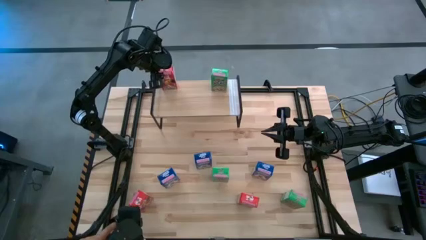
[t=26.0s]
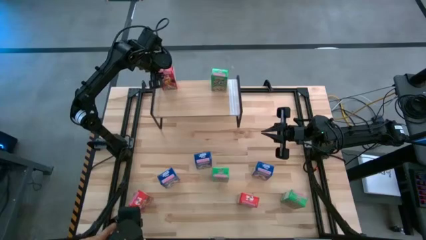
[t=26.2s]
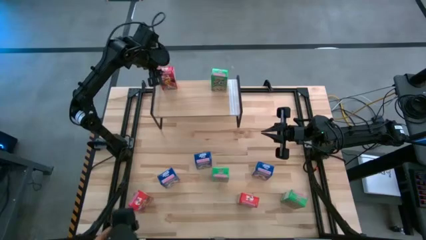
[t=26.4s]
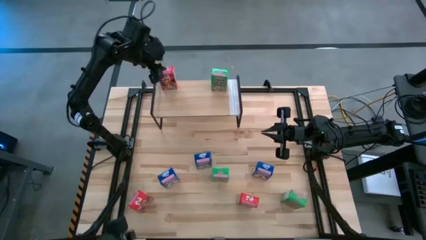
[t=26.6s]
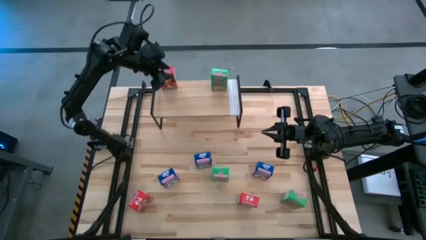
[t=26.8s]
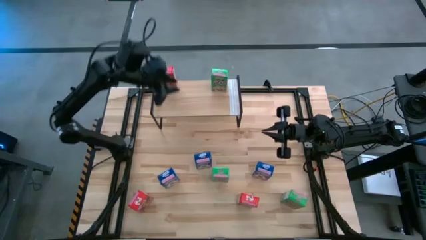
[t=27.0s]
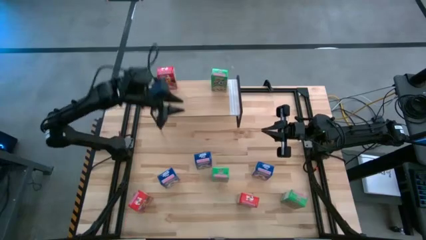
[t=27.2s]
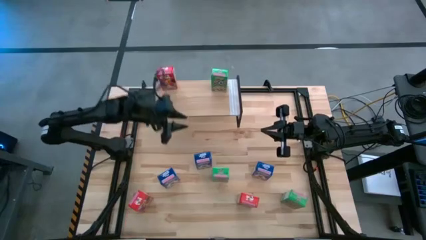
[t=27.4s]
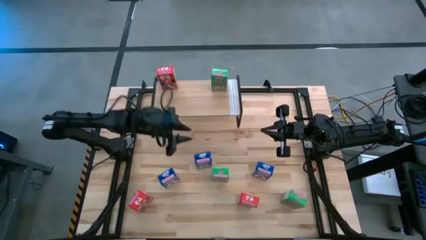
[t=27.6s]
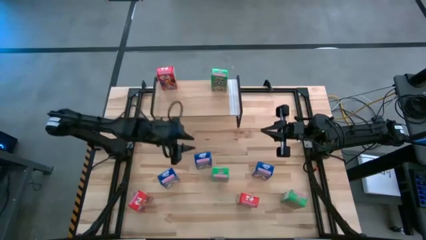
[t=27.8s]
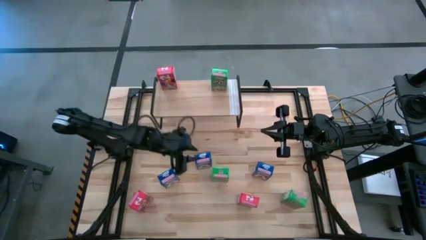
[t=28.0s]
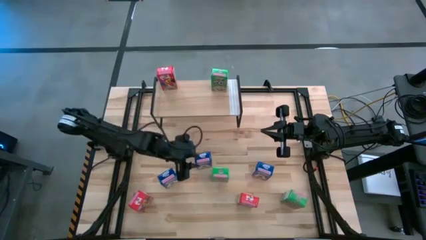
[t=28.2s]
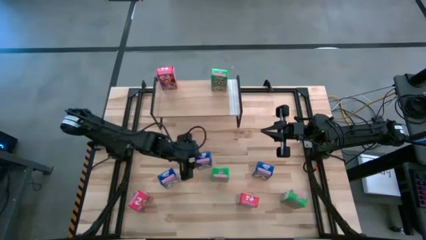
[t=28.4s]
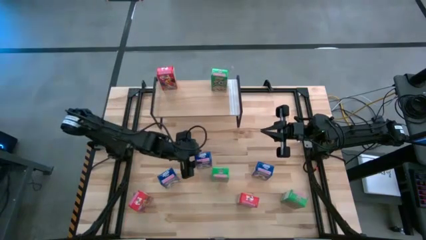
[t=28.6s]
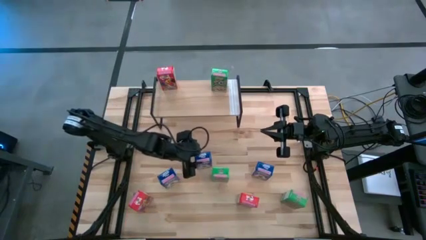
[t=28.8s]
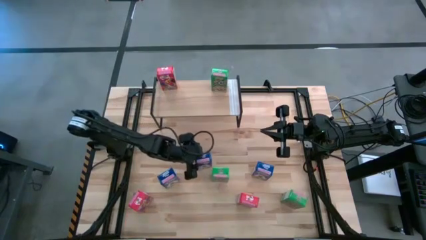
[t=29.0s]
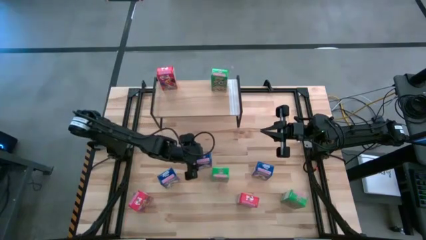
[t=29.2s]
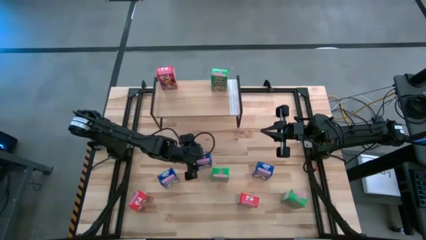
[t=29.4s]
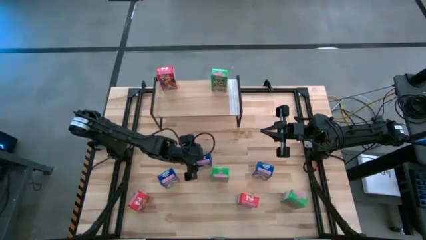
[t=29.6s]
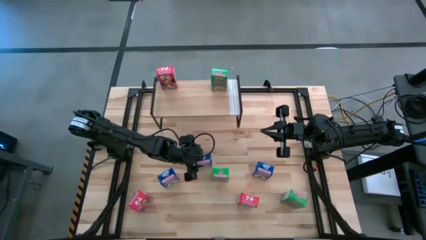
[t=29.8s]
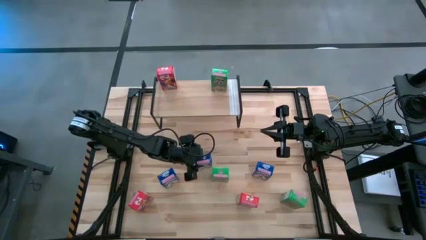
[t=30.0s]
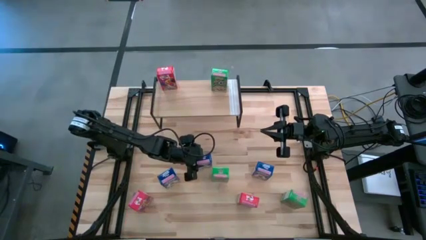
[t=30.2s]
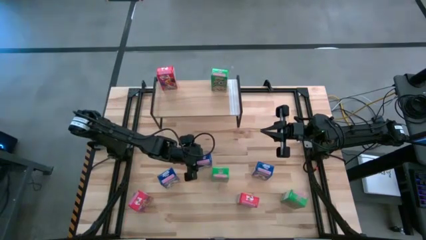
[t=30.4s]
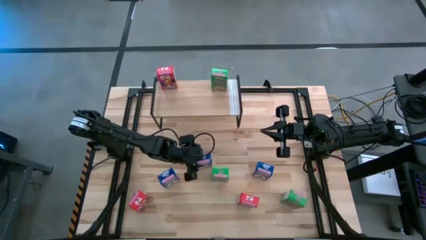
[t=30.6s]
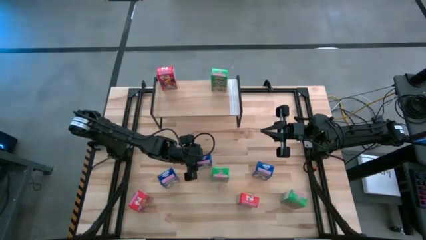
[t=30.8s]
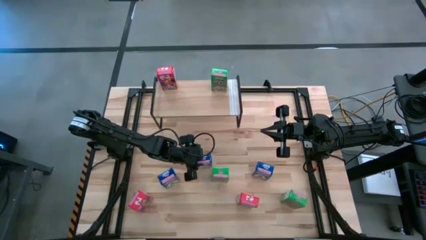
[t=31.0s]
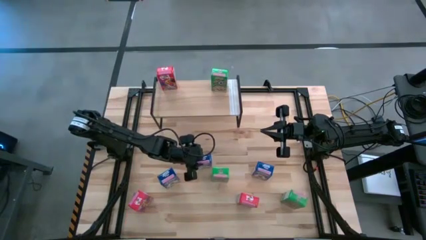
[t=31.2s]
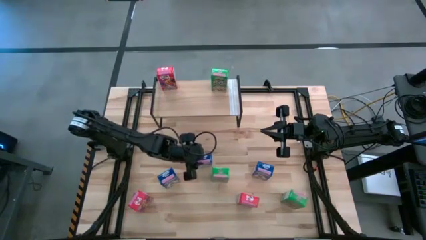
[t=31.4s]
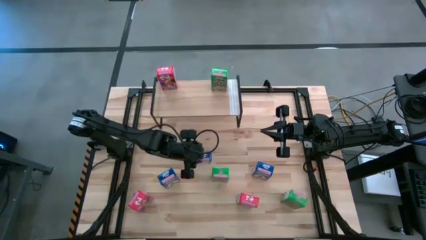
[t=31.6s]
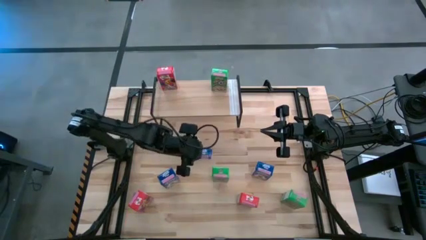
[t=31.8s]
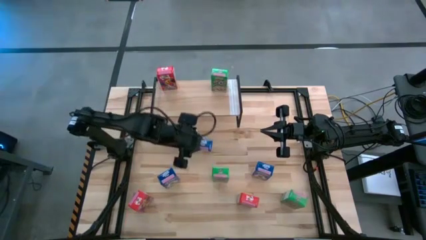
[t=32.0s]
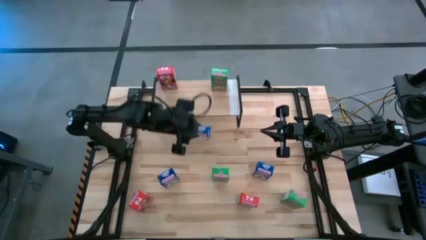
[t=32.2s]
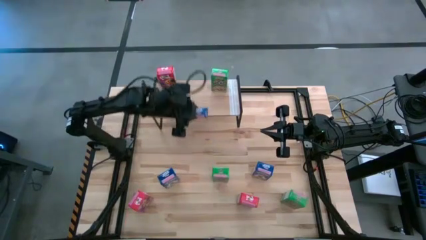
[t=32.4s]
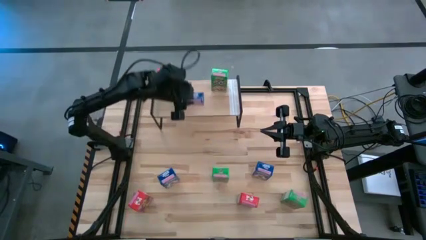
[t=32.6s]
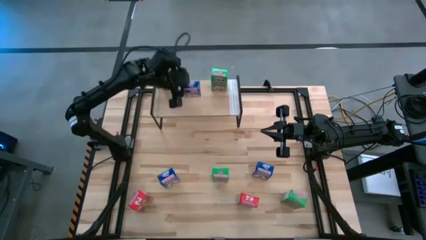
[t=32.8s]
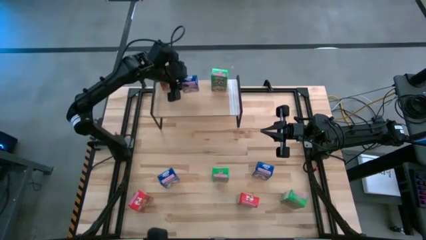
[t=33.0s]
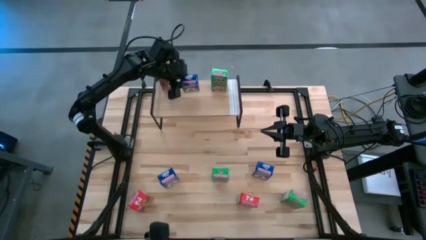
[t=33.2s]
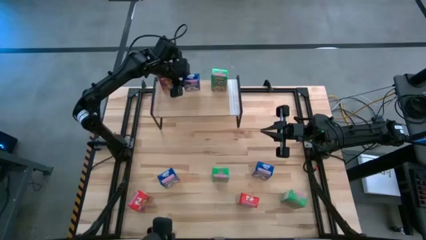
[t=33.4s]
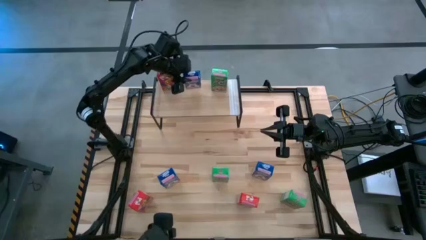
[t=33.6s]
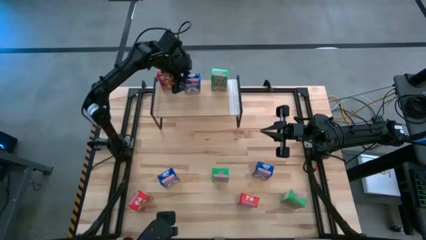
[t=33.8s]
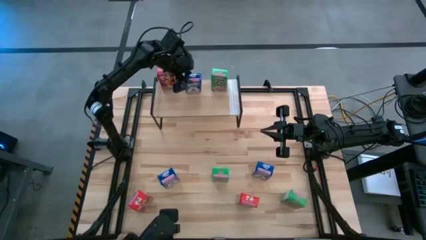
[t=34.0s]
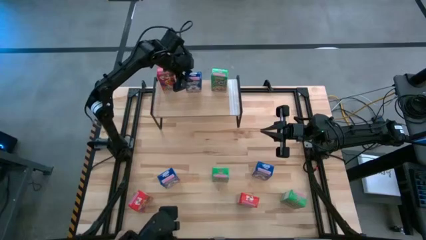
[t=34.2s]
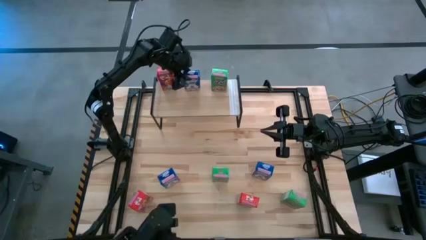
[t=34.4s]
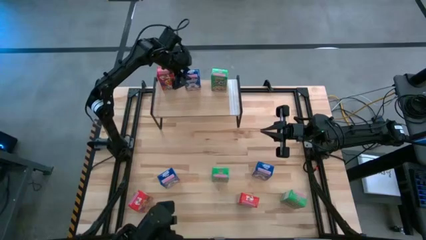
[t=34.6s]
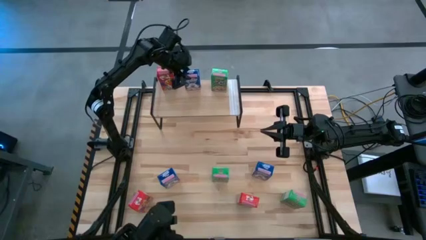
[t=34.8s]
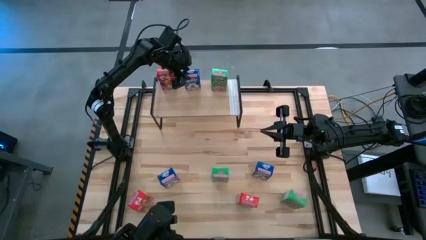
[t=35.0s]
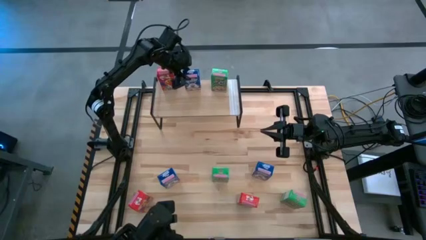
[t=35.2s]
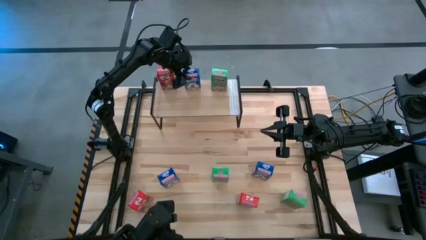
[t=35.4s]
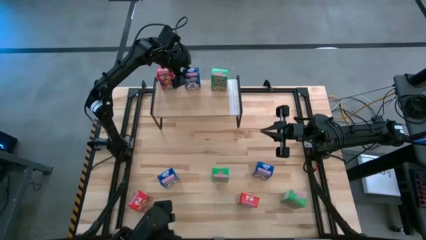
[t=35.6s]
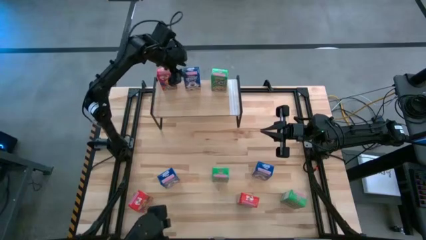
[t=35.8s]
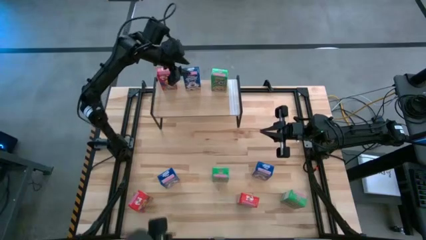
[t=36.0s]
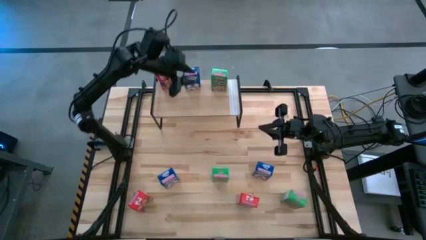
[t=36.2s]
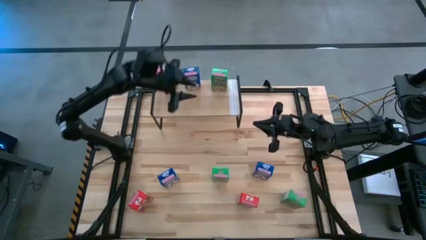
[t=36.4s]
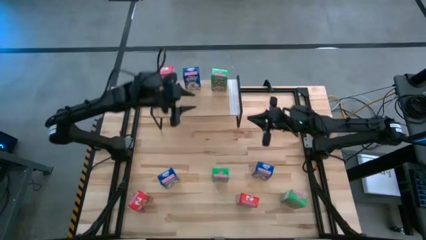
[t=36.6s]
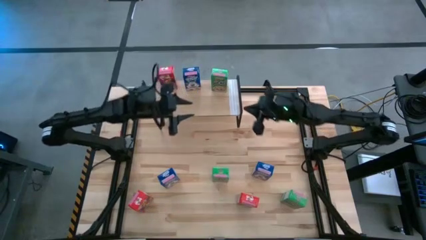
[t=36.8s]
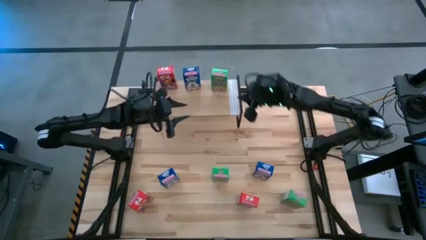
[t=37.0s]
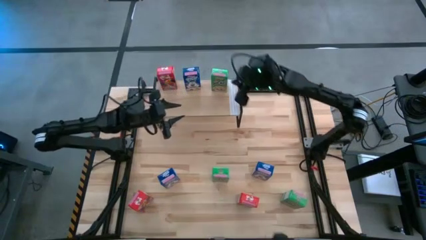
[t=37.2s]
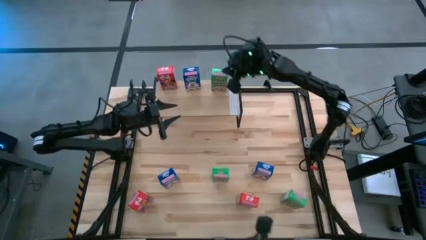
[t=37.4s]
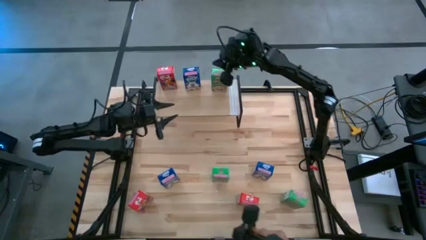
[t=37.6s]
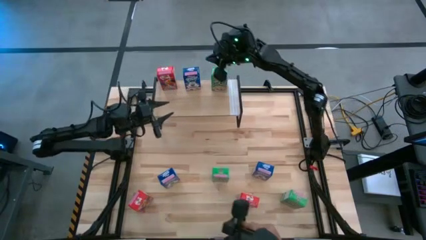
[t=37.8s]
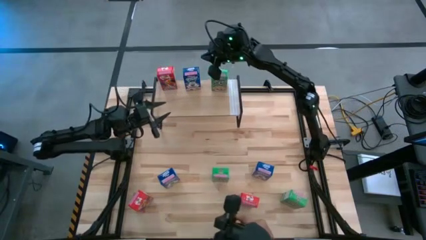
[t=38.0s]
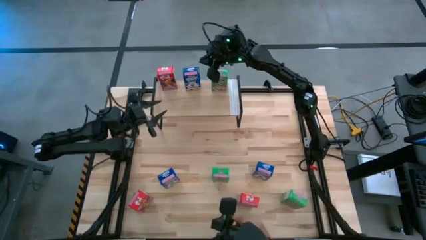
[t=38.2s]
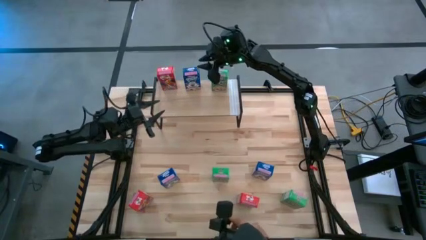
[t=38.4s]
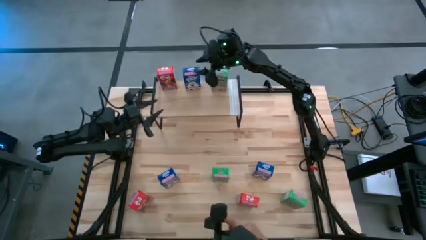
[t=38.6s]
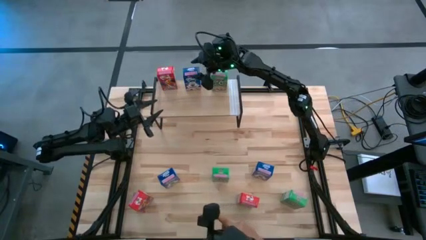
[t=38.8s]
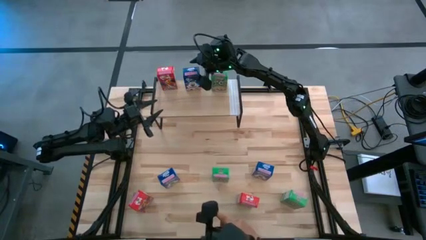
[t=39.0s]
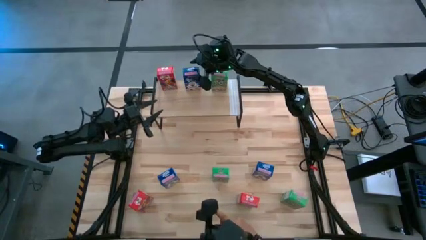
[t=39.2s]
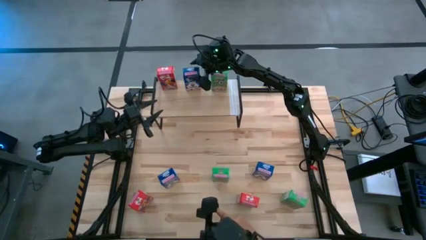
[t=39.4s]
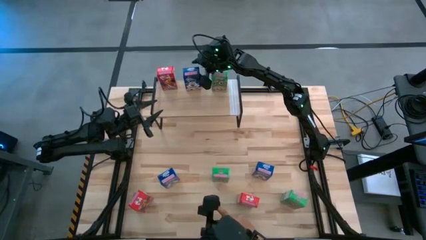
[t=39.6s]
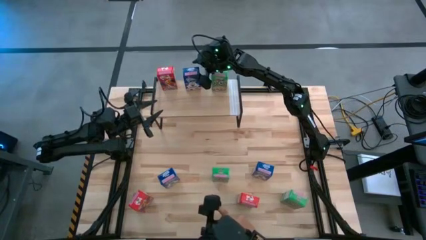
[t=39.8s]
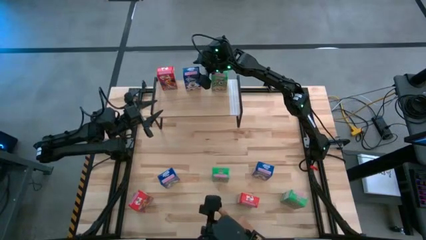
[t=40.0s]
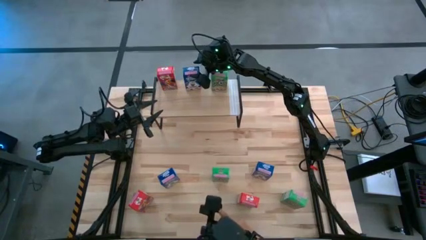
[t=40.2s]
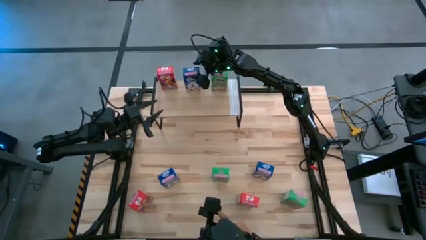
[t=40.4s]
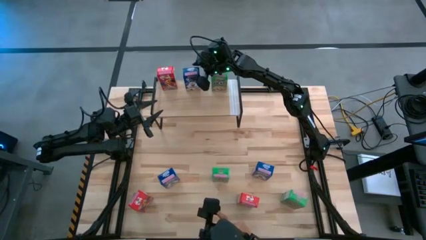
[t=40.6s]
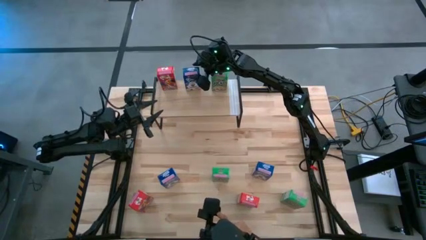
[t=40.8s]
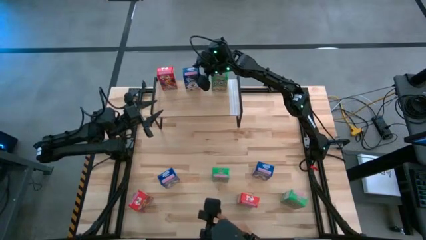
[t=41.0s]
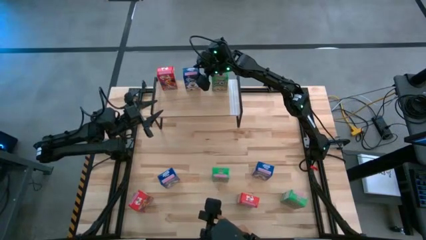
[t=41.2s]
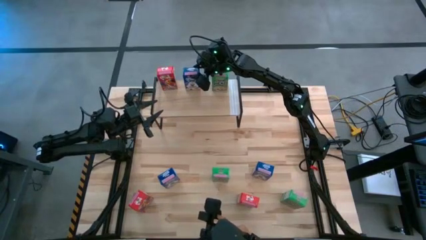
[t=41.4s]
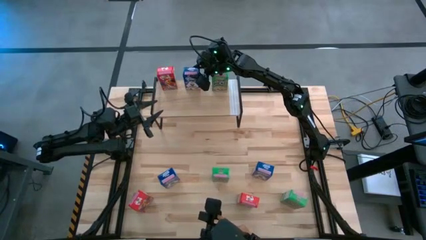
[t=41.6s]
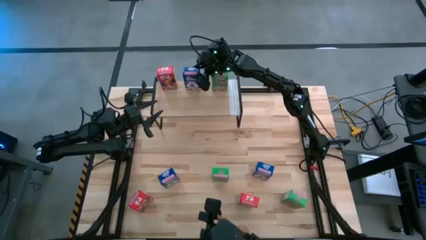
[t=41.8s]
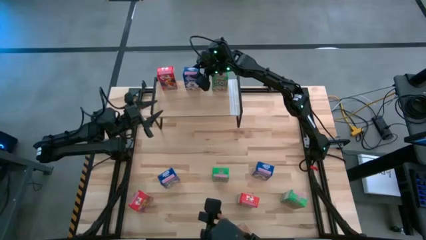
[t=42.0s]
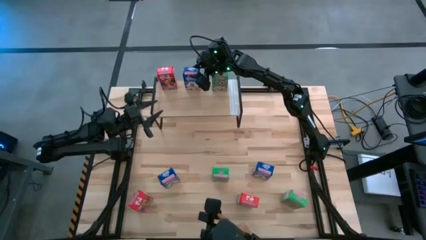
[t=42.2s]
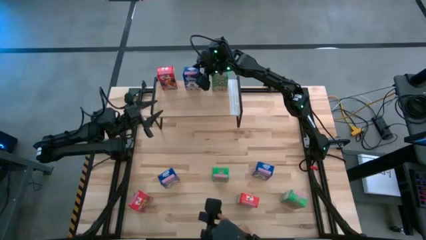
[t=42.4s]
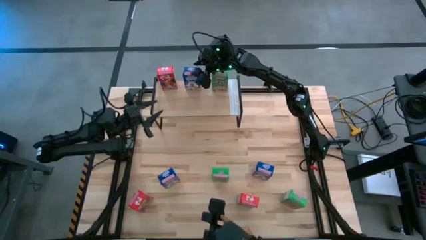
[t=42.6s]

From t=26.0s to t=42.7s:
Task: Stack cereal on shelf
Put the middle blue cereal box on the shelf

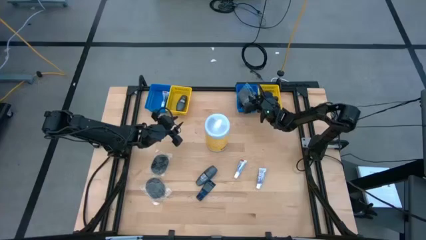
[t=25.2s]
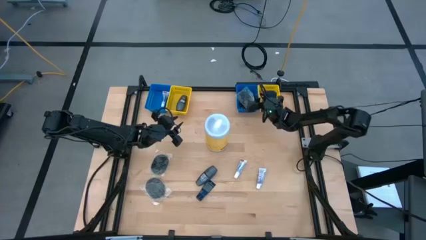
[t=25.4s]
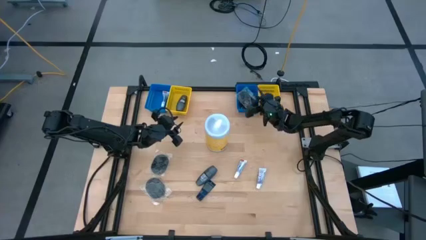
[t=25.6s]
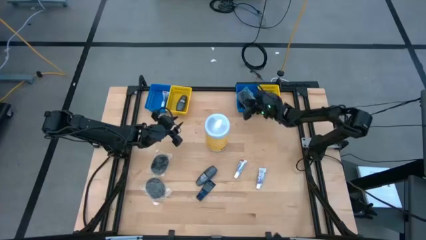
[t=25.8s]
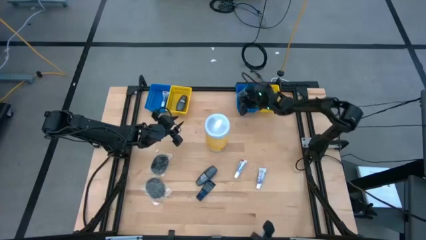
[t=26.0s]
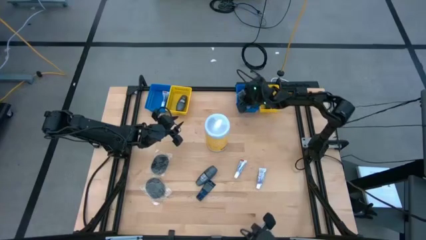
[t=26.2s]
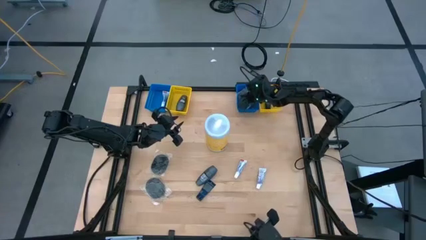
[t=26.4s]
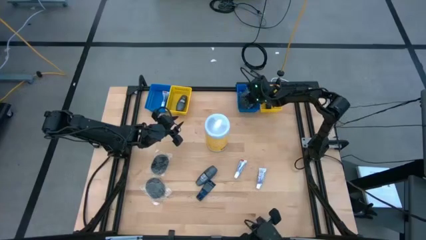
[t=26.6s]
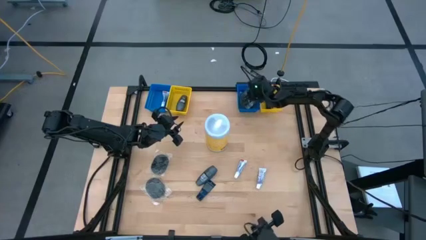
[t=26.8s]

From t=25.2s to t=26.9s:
Task: Pick & Place Travel size toiletries
Adjust the hairbrush from the right blue bin
